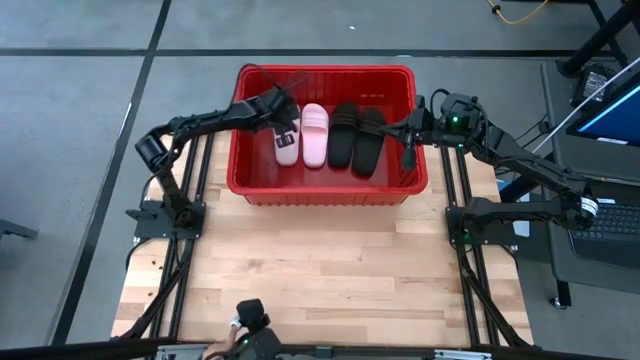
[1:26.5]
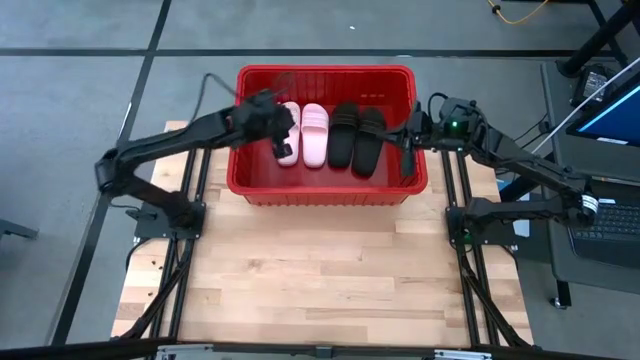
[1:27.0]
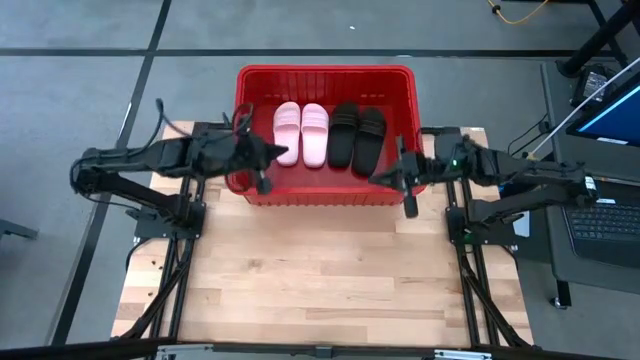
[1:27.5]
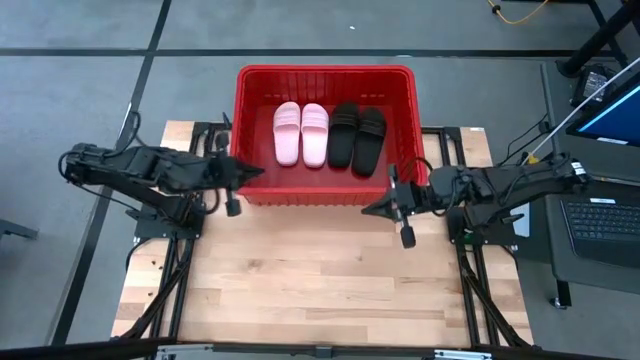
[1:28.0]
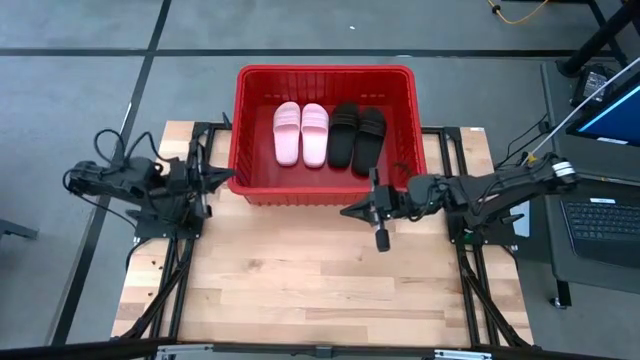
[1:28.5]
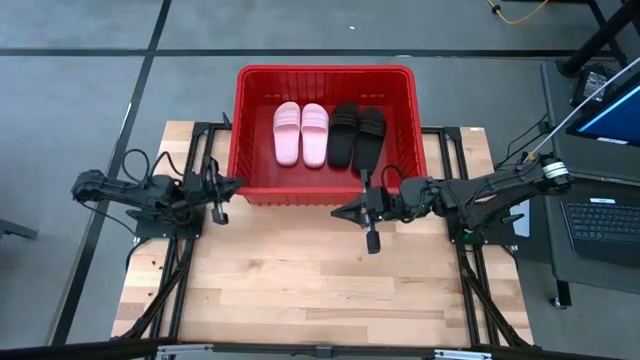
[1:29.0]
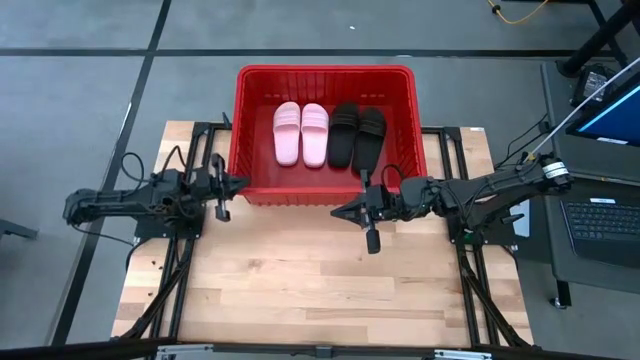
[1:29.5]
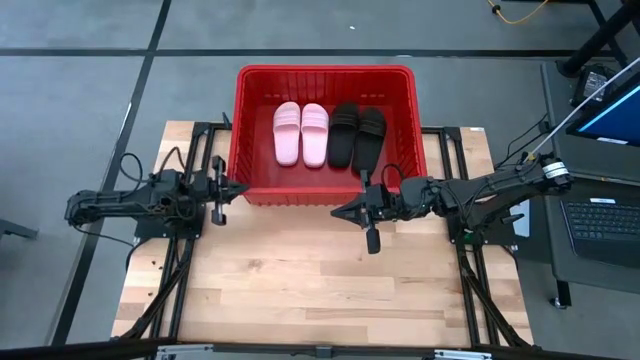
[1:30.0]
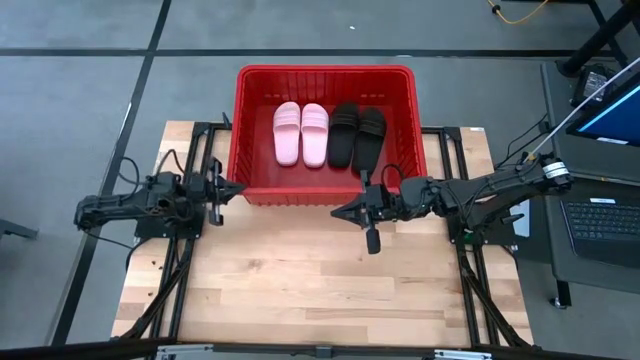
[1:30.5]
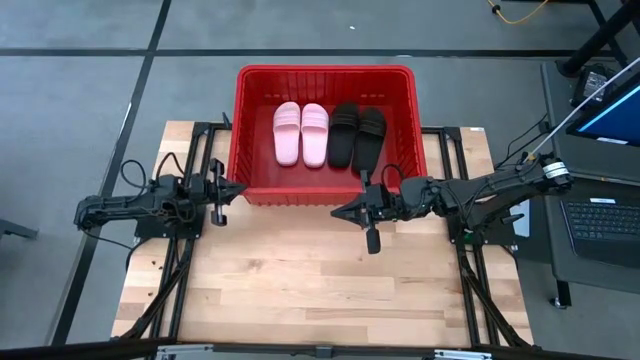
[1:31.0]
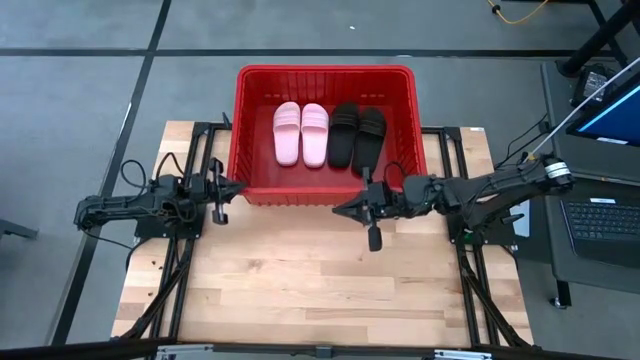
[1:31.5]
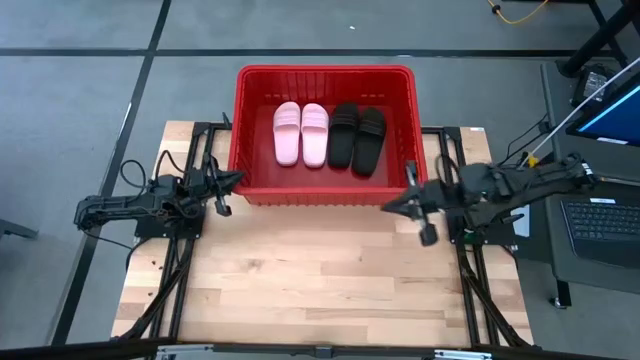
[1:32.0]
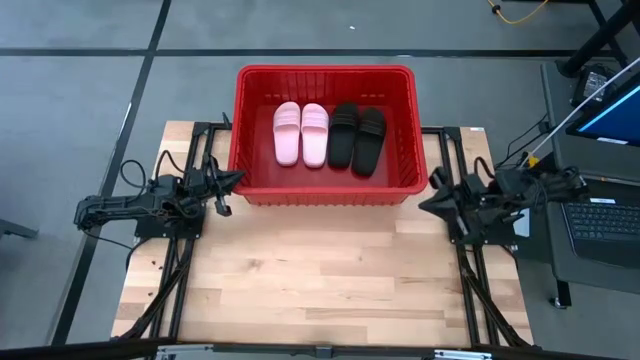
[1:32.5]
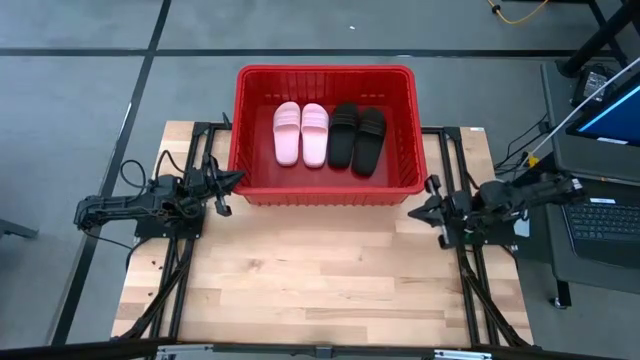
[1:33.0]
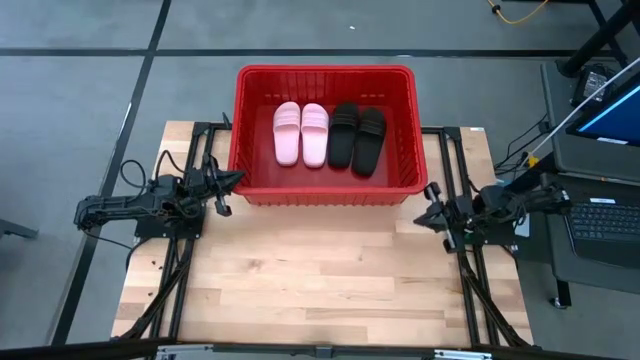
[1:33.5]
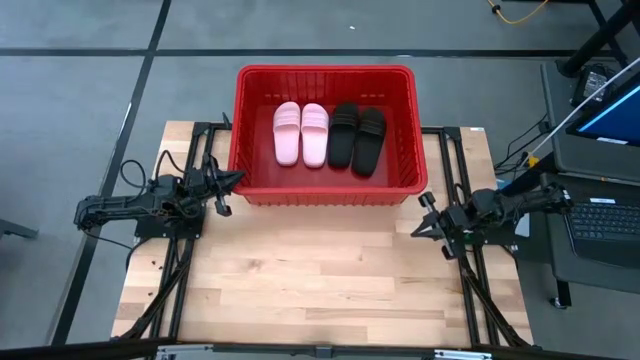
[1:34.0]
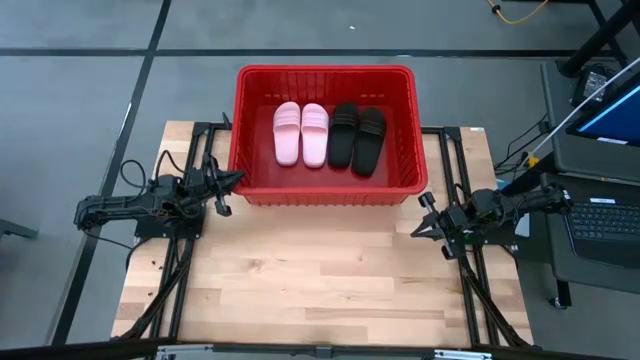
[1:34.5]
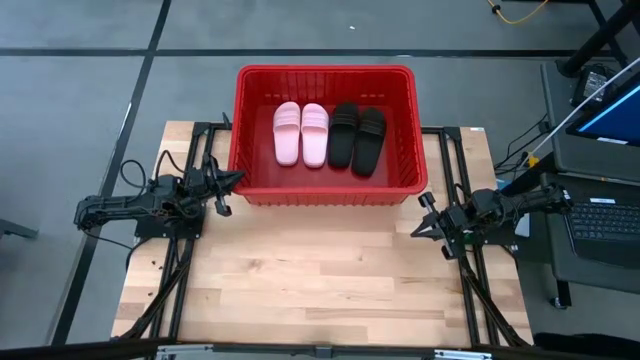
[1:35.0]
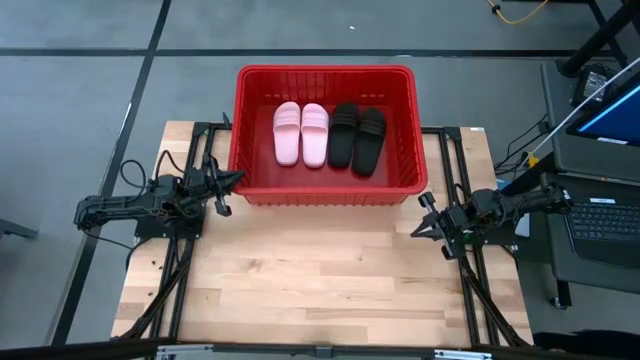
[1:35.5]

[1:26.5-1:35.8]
Task: Pick and place slides into bin
Return to Home Position

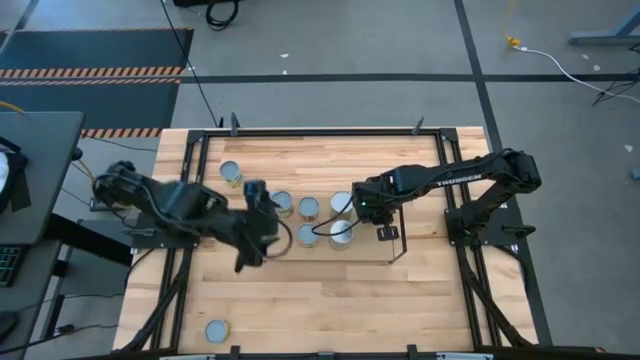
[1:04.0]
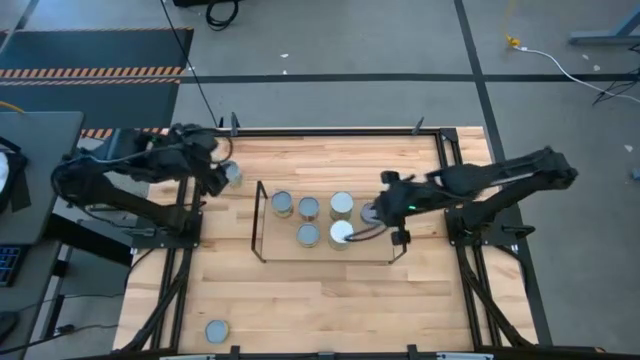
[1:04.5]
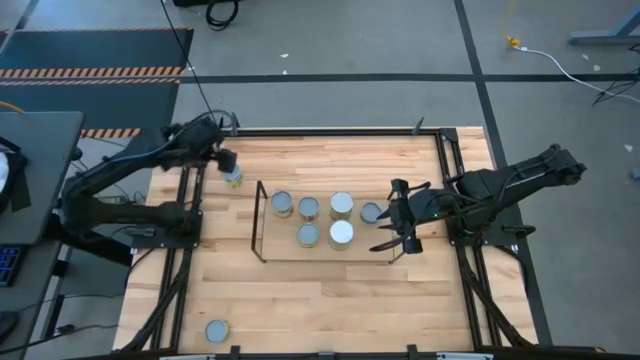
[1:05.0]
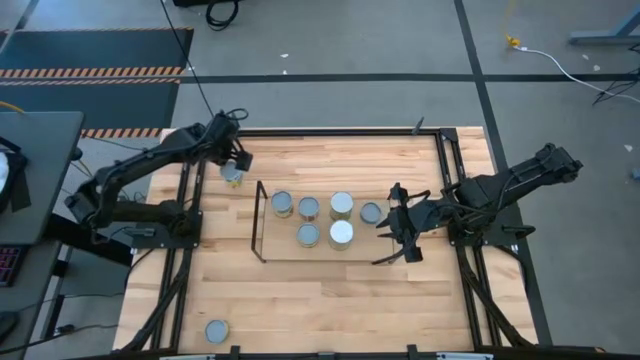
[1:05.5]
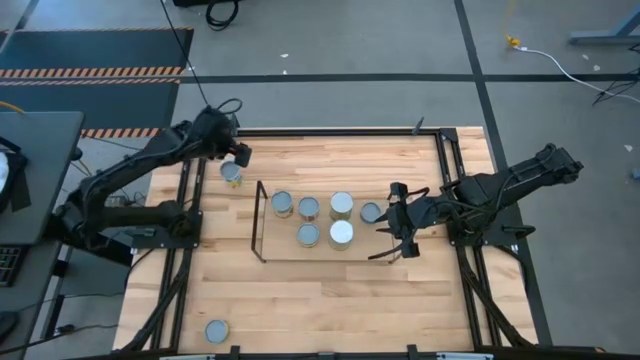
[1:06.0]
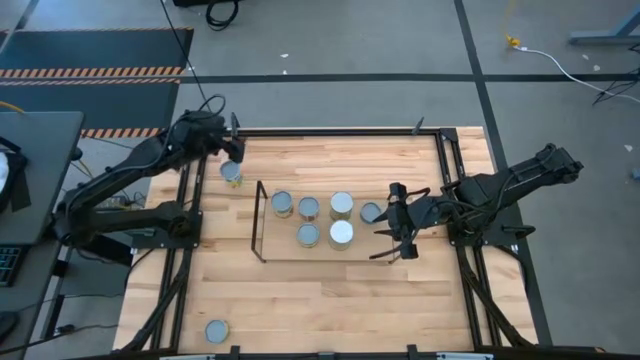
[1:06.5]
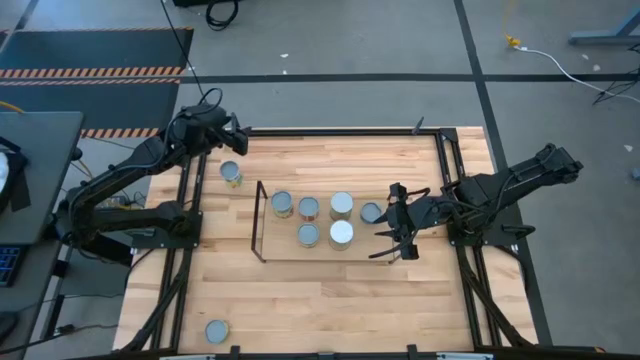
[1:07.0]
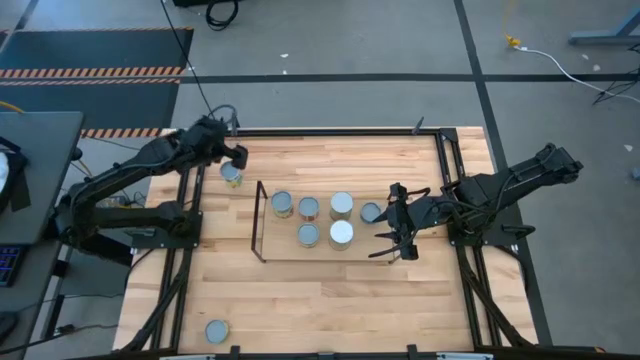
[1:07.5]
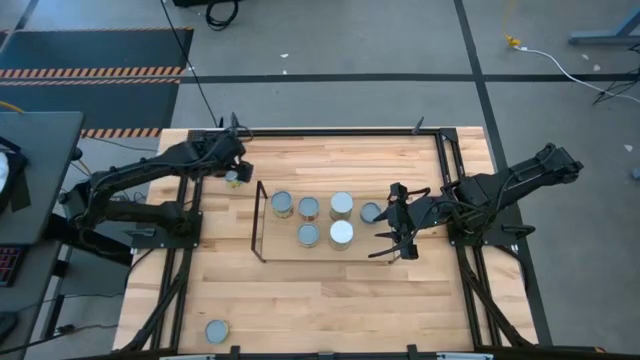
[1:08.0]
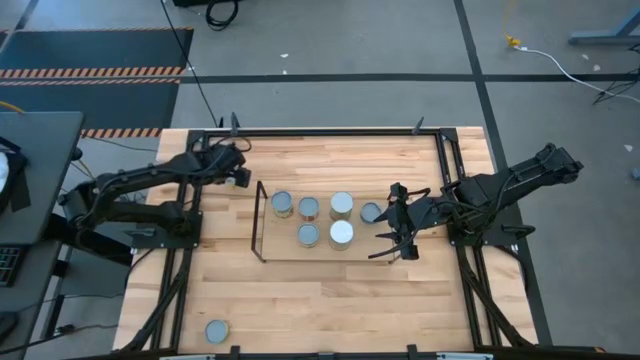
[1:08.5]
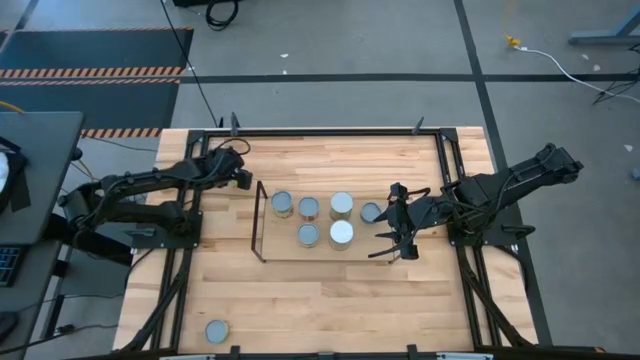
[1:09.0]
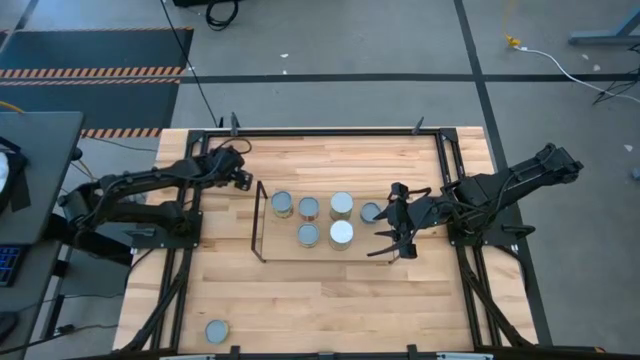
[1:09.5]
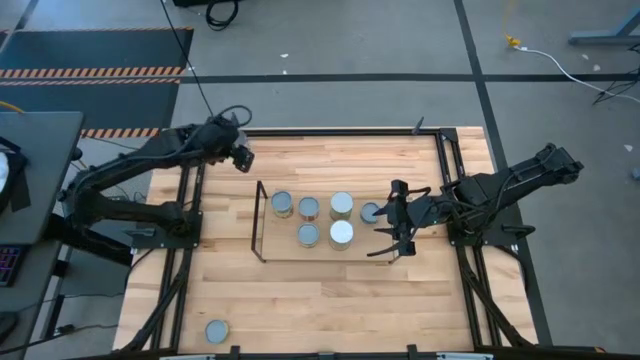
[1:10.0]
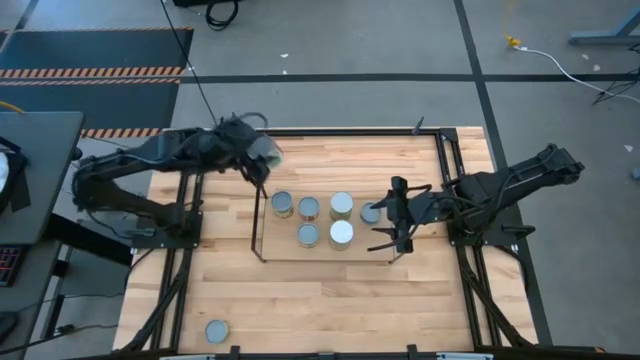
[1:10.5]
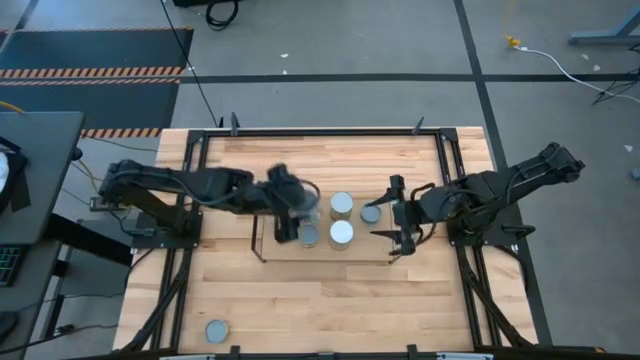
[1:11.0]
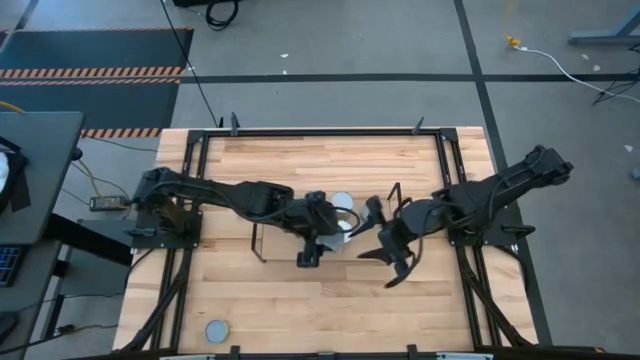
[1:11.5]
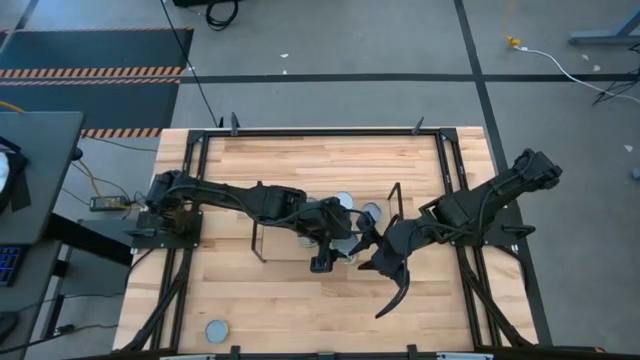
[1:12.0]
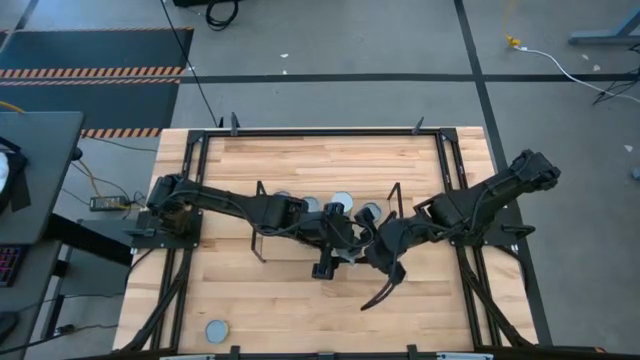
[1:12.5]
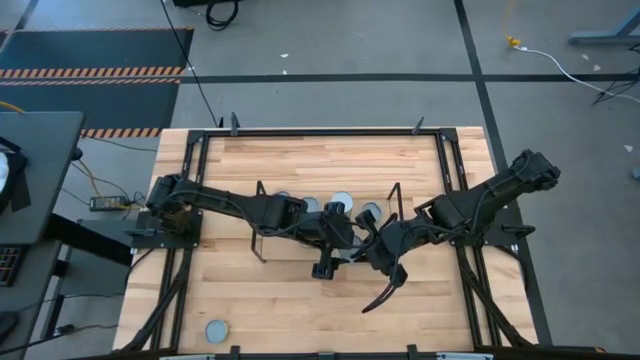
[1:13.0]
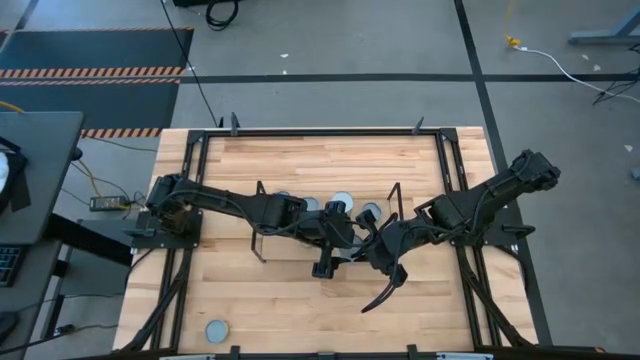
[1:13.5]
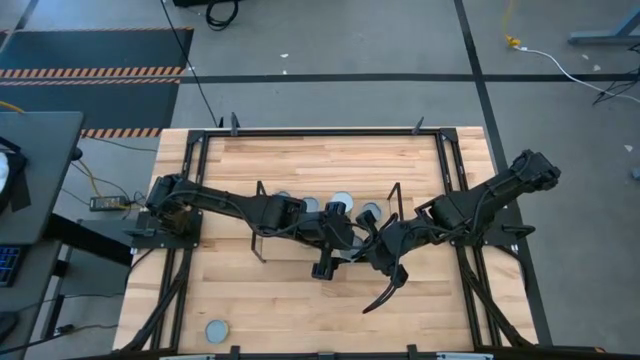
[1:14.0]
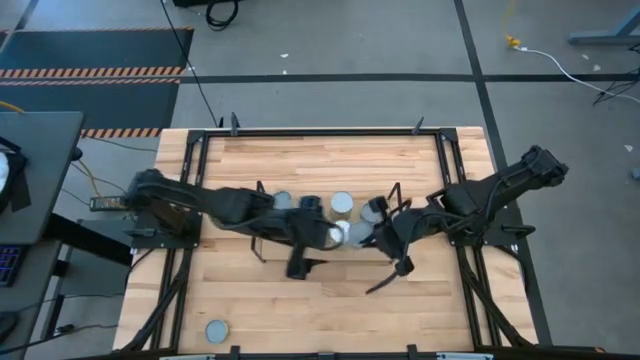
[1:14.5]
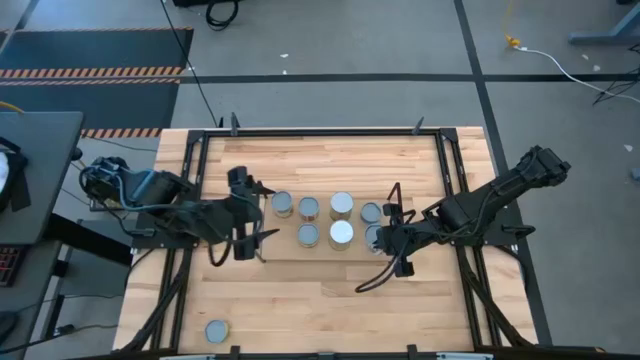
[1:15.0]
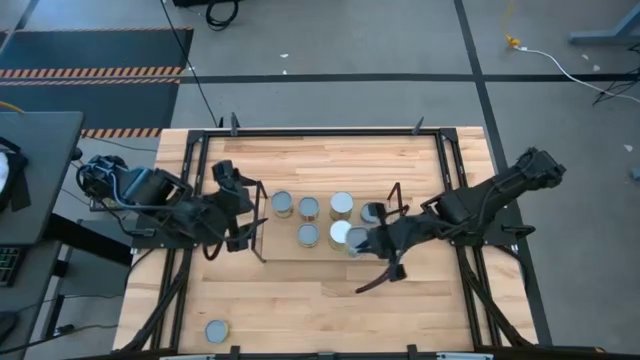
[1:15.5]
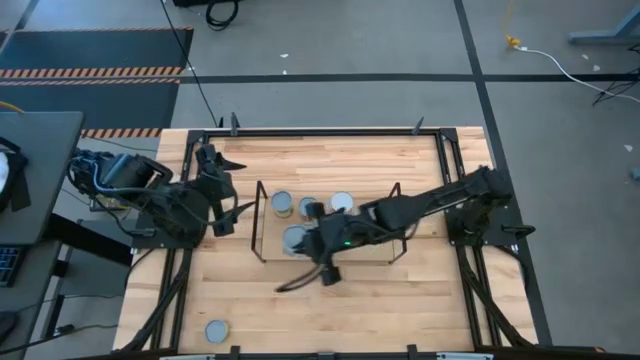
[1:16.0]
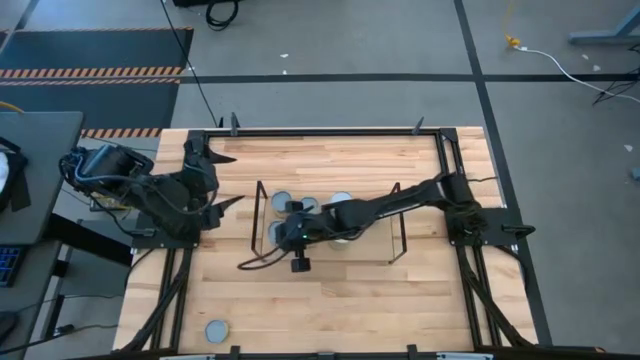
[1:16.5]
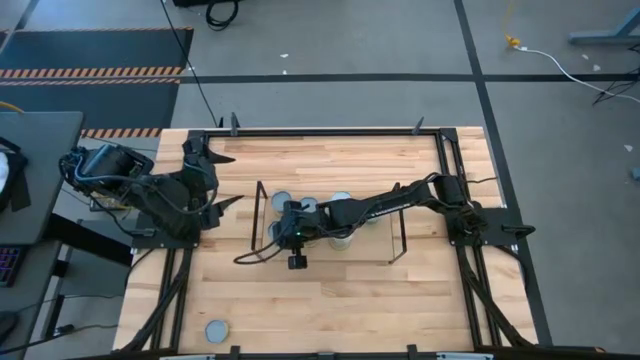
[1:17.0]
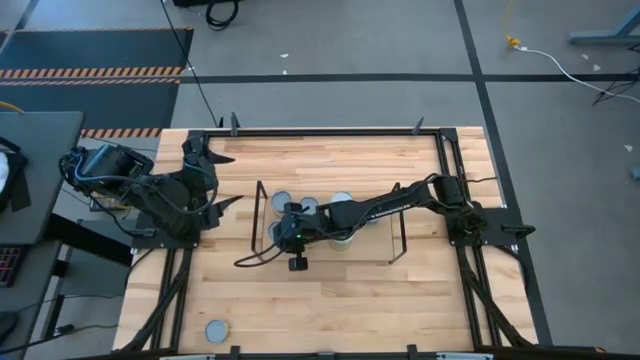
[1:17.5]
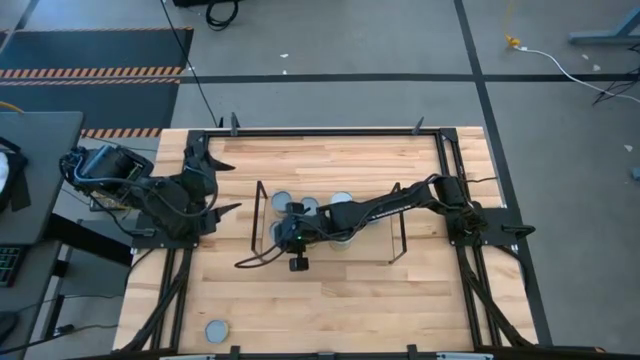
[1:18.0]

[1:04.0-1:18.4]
Task: Pick and place cans onto a shelf
Put the white can on the shelf aligned with the green can
